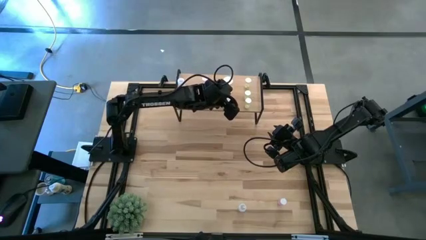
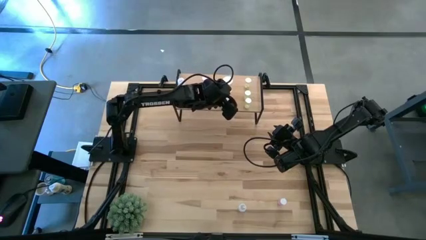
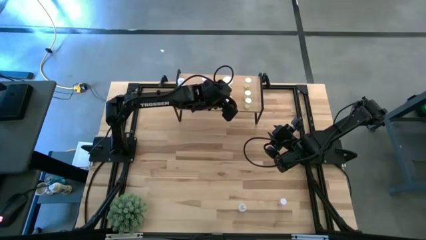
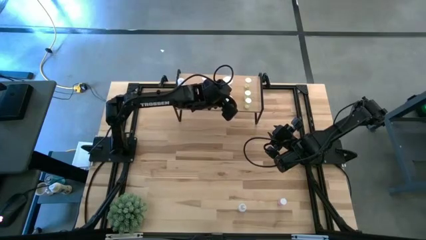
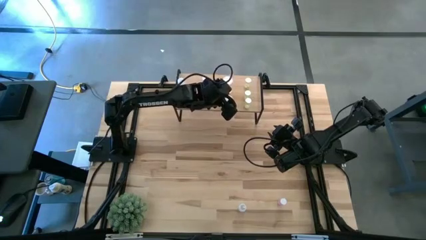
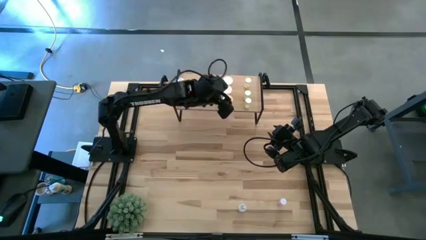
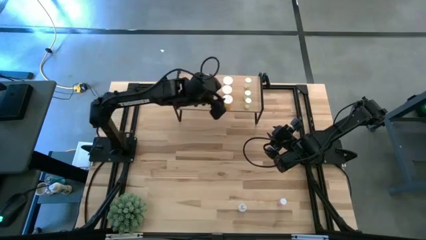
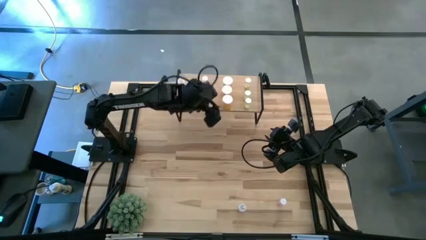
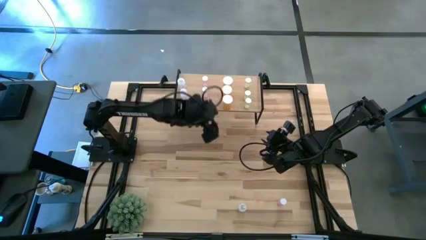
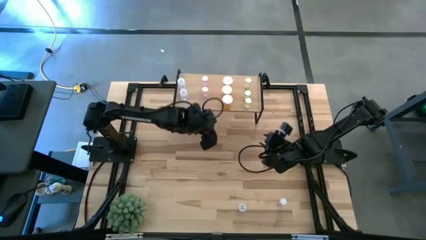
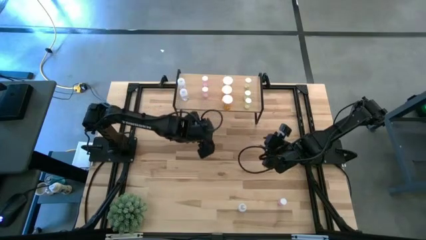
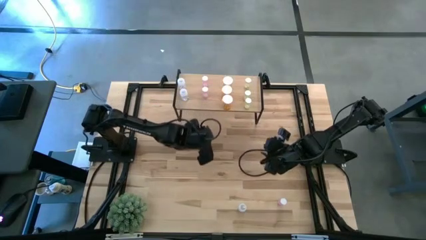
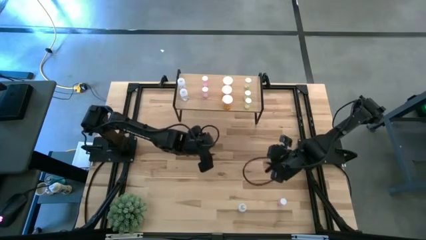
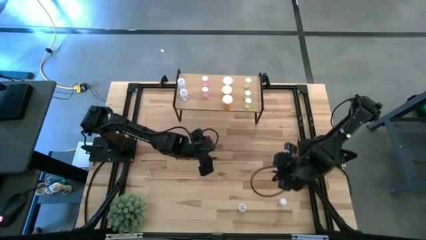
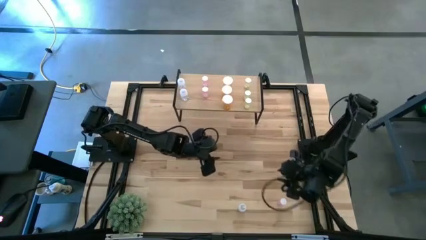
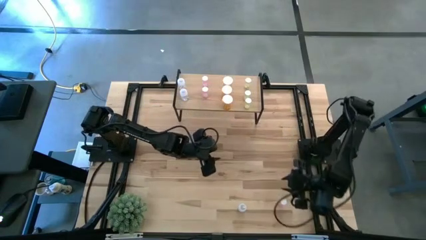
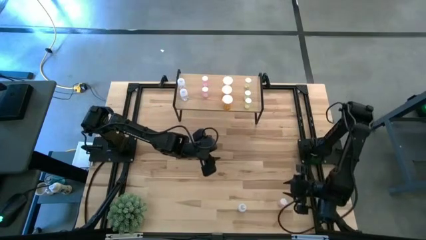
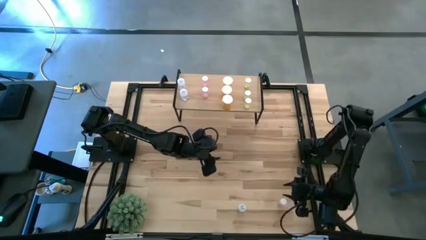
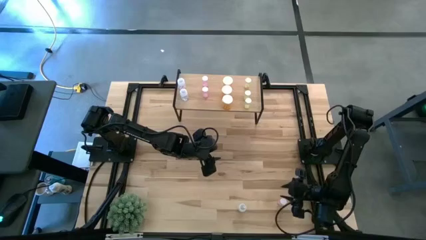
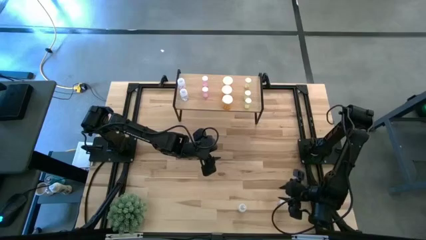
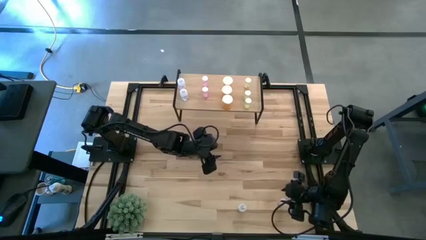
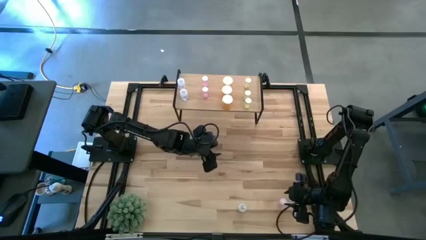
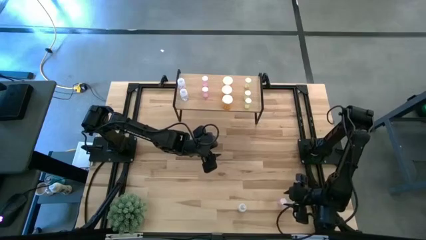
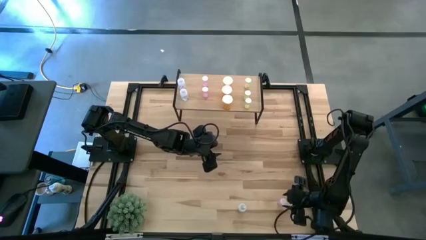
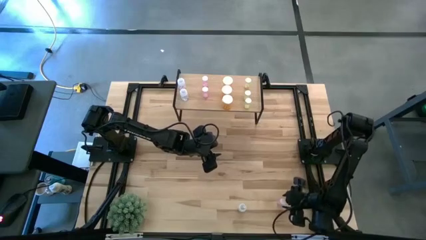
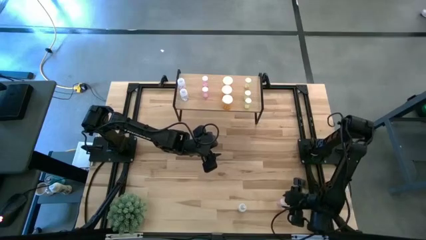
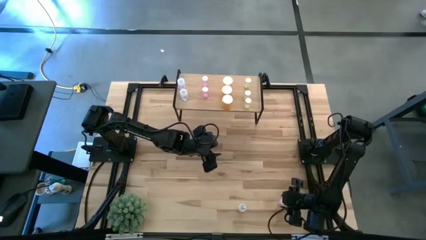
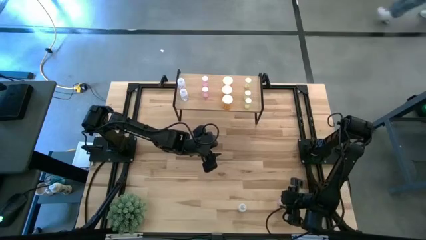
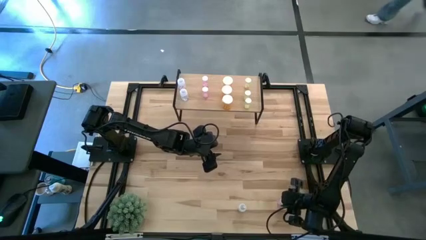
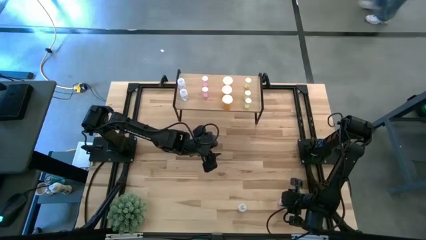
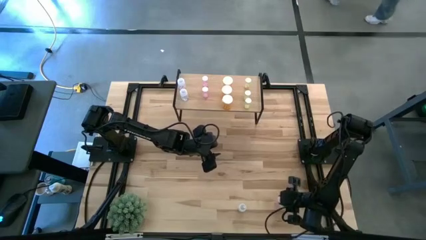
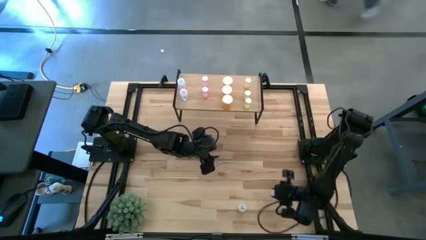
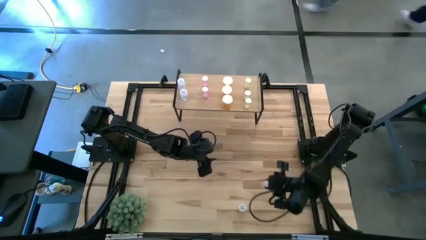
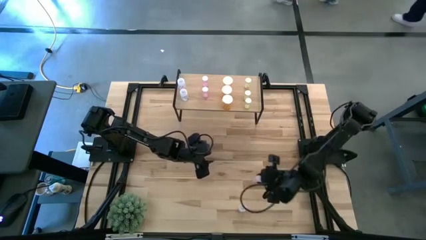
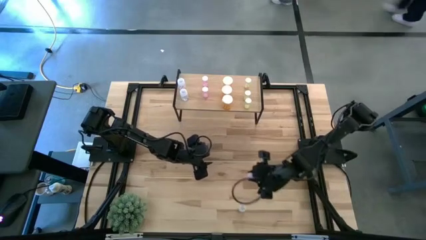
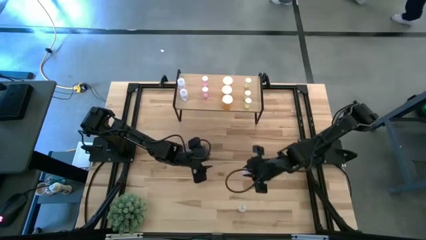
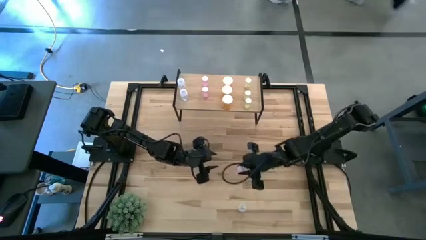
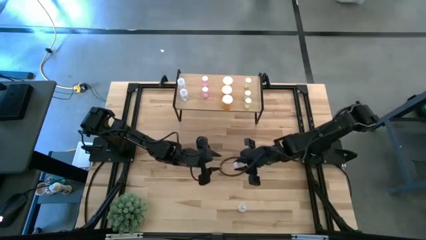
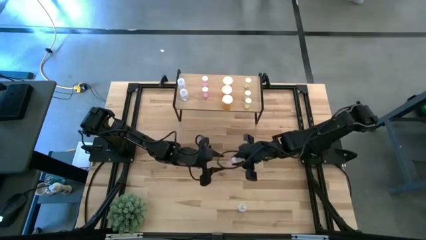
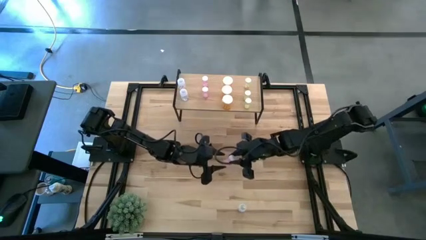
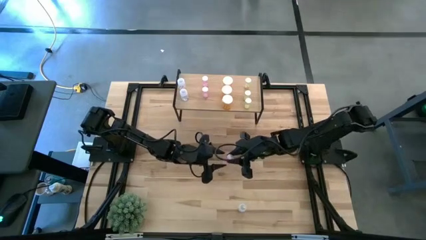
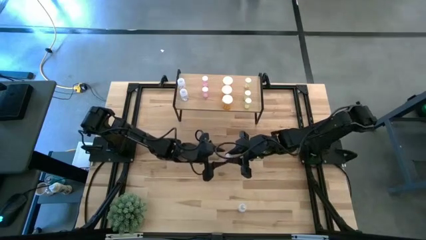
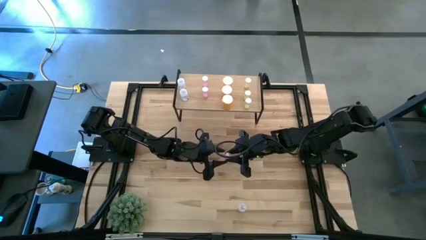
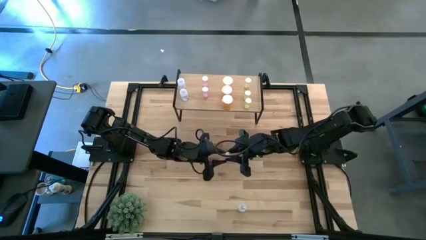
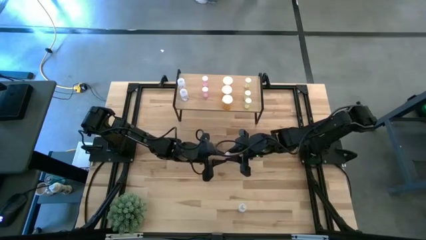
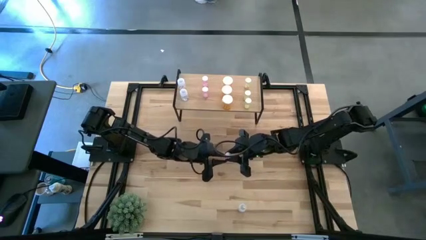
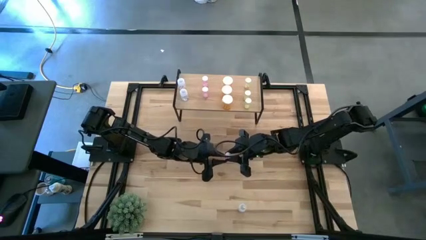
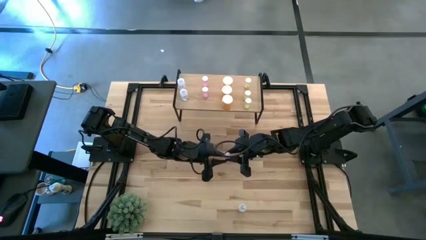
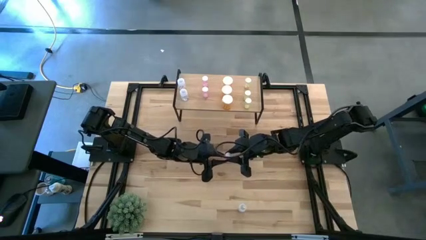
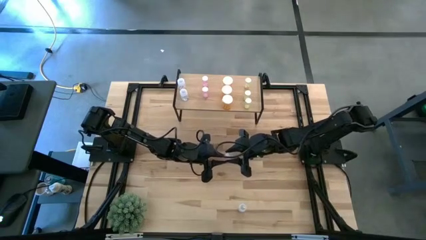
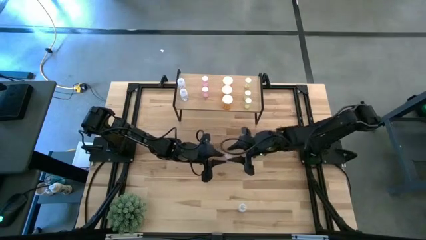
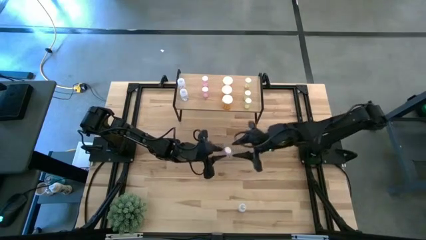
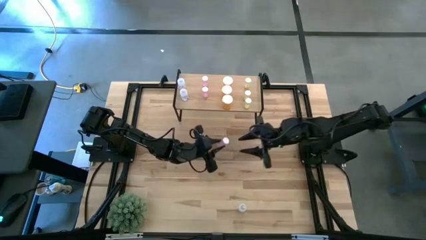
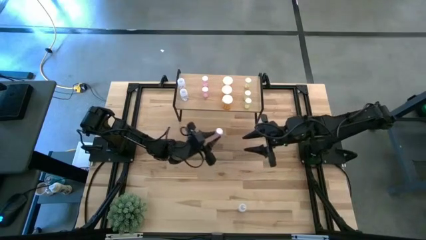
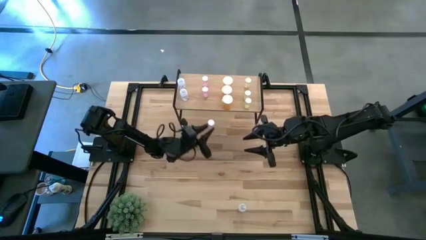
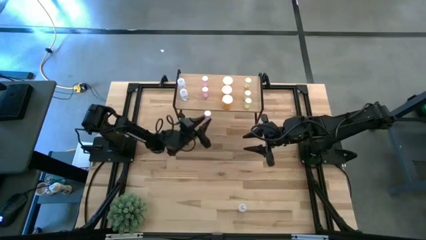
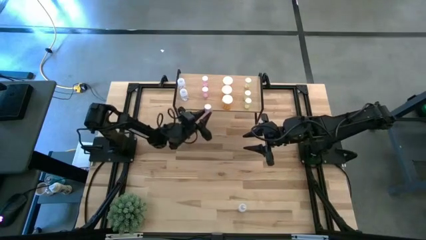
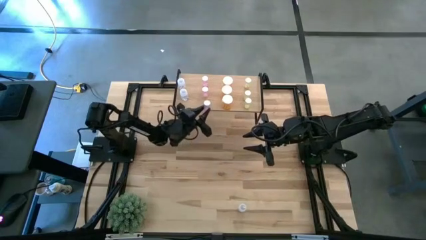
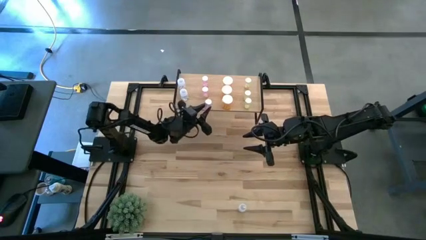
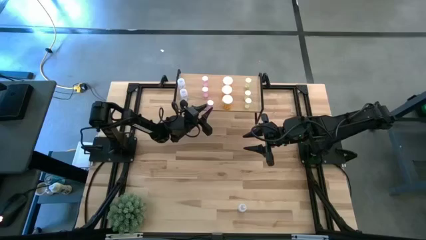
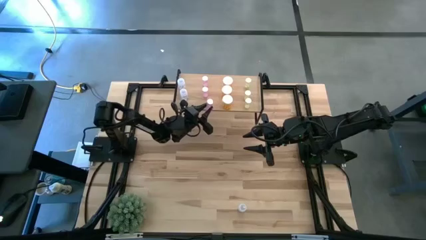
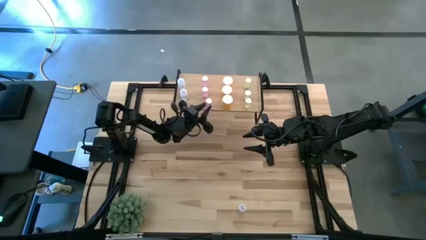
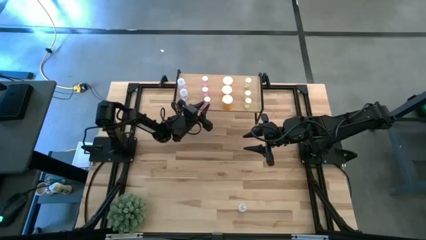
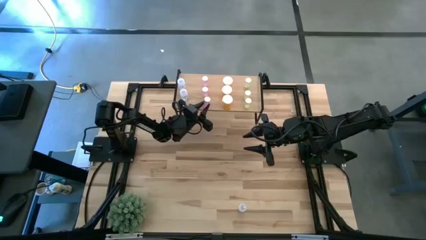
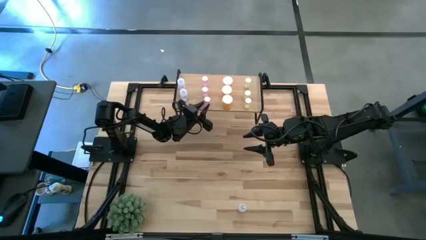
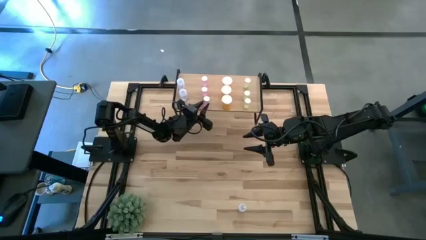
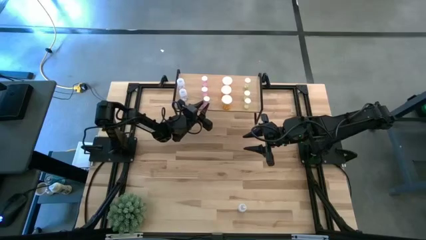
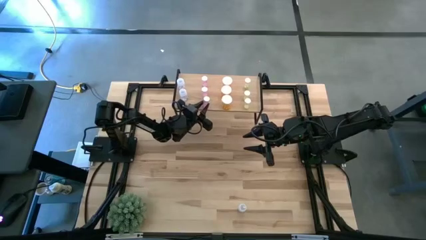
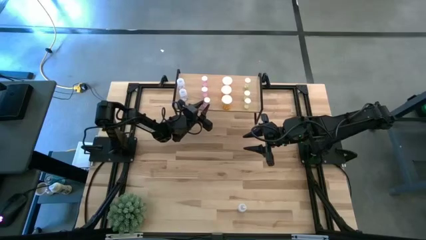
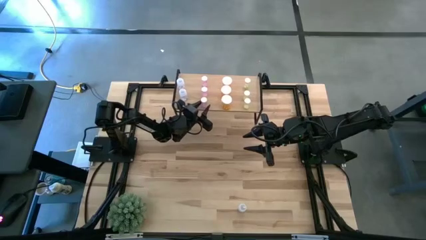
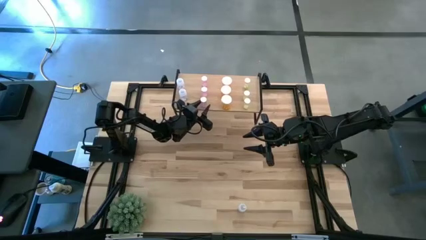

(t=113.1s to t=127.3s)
Task: Pick and place medicine bottles onto shelf by color
Put the pink pill bottle on the shelf aligned with the other pink pill bottle

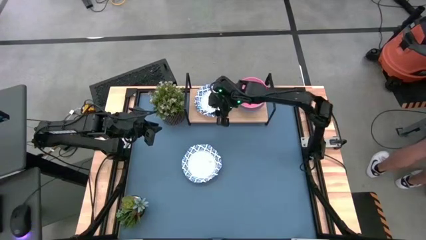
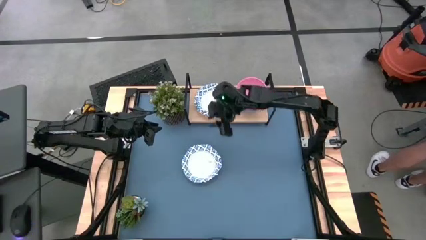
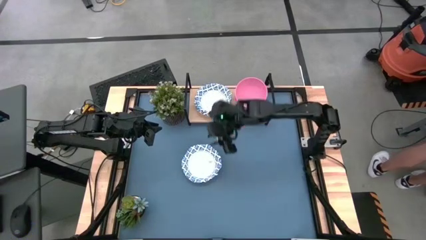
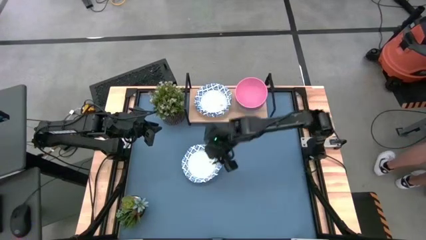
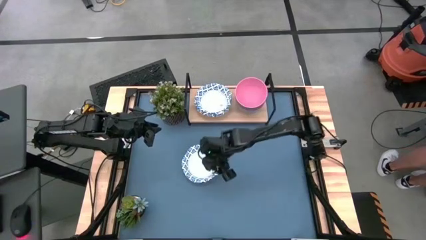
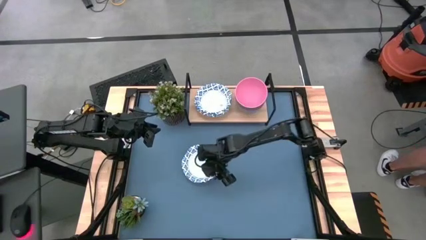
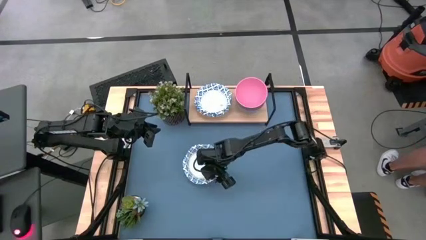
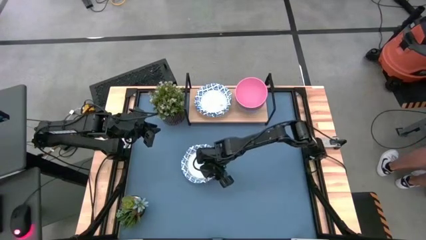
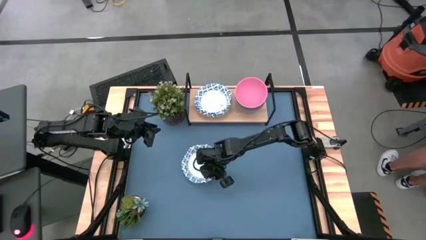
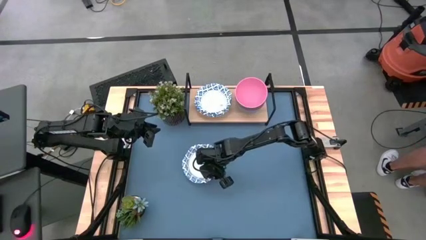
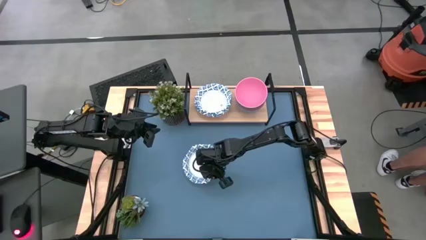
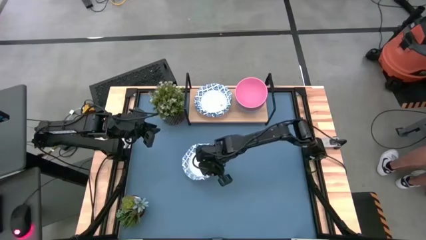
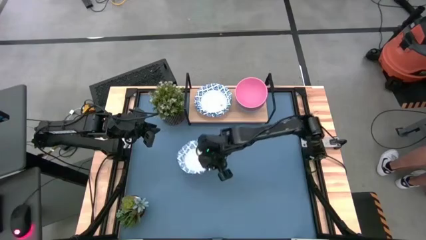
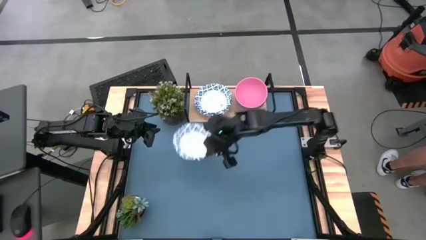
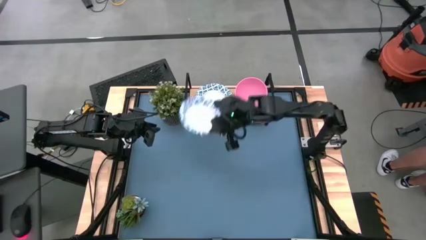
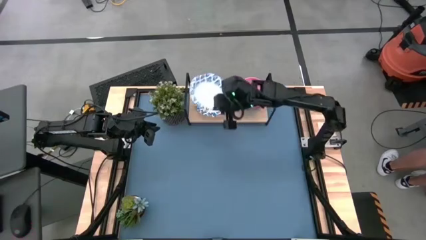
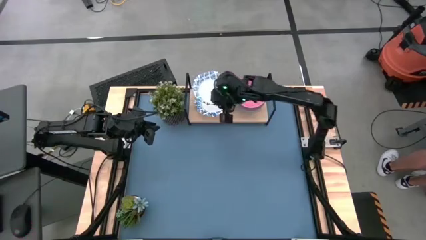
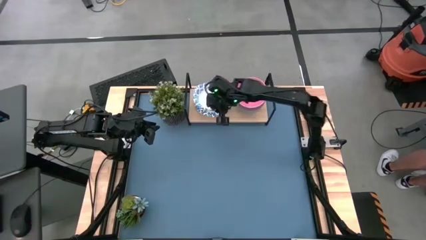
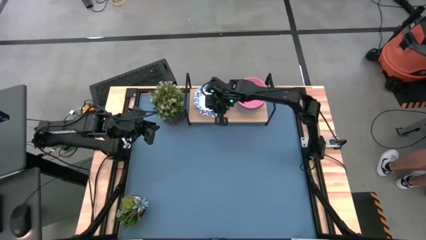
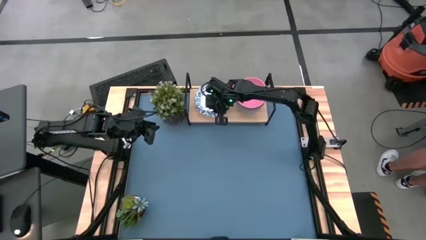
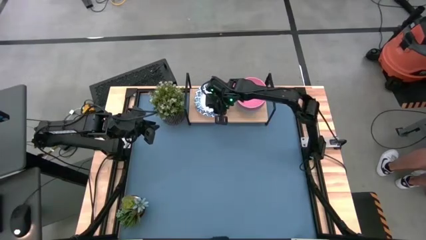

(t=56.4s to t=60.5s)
Task: Place and stack bowls onto a shelf
Stack the blue patterned bowl on top of the other blue patterned bowl on the shelf
